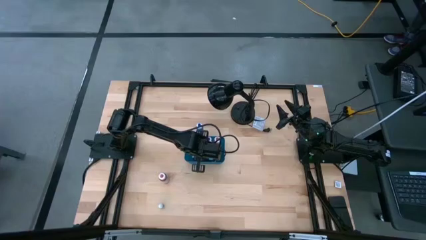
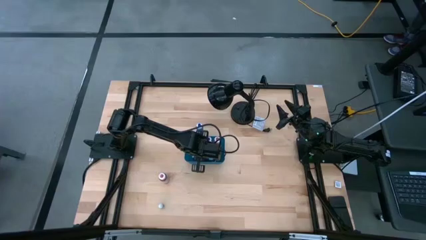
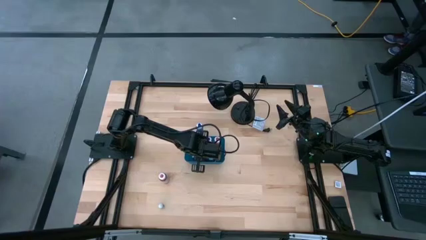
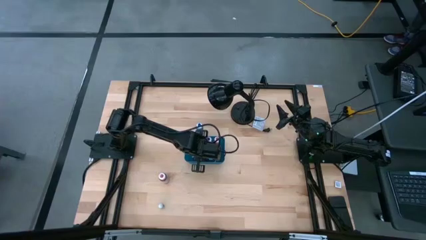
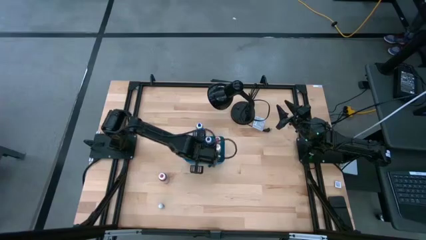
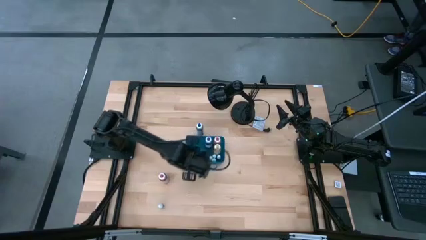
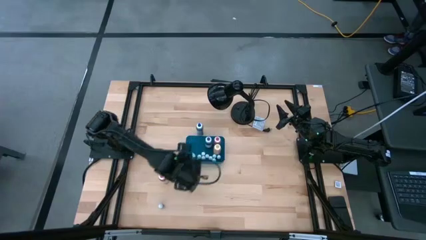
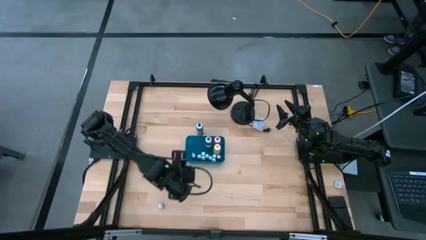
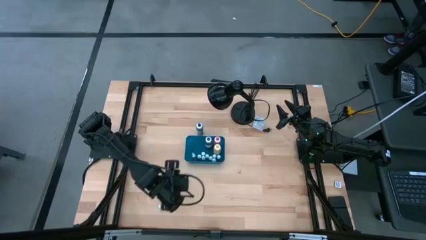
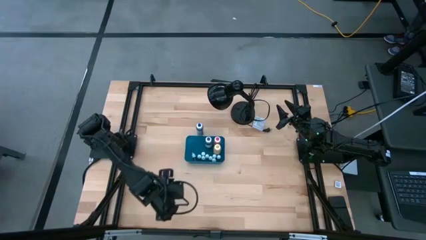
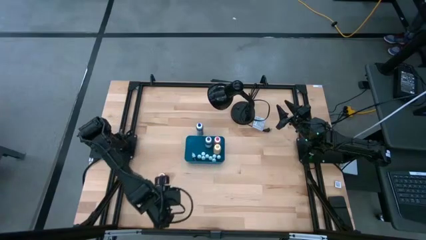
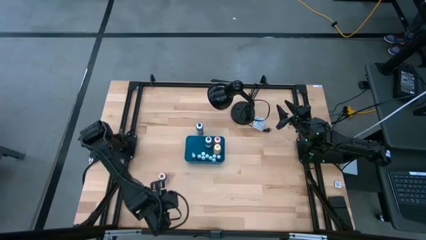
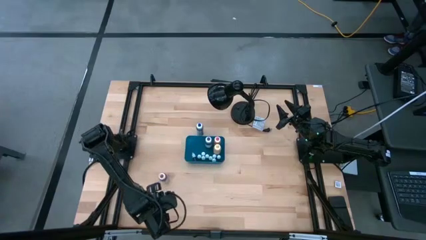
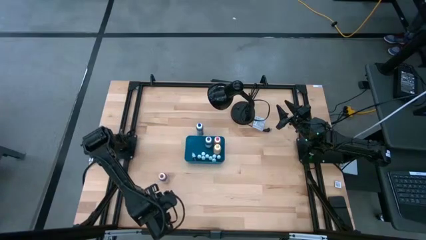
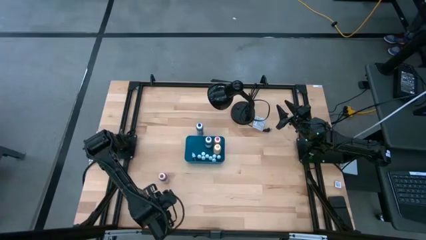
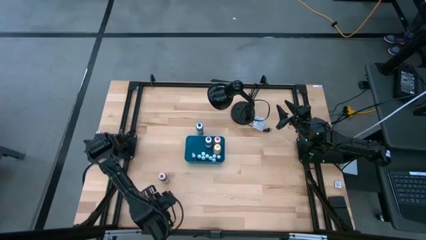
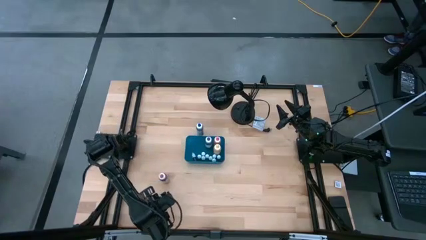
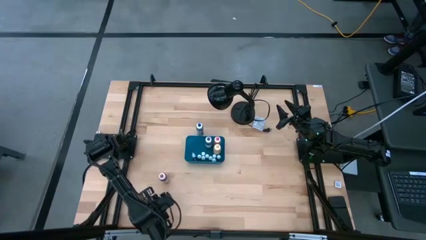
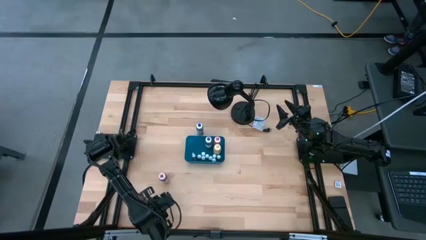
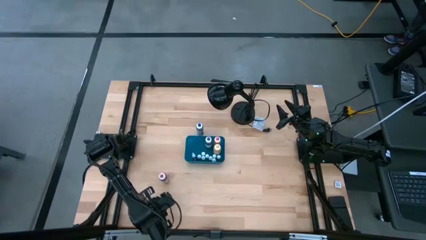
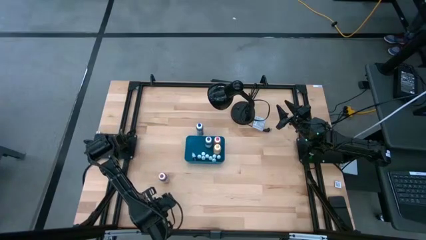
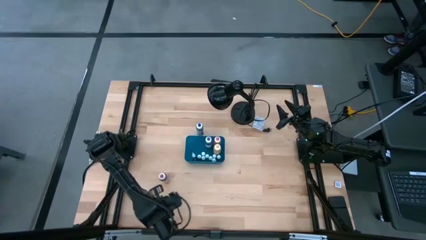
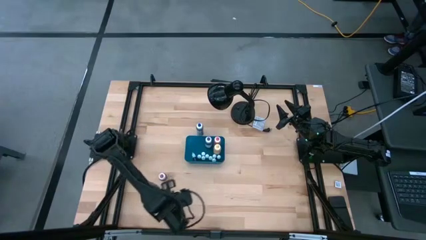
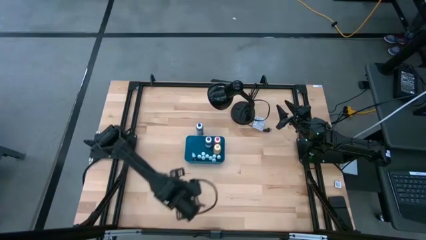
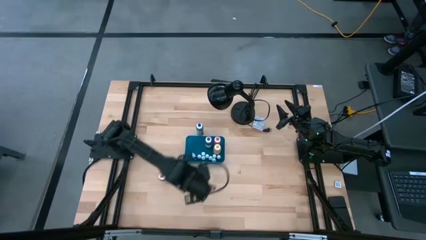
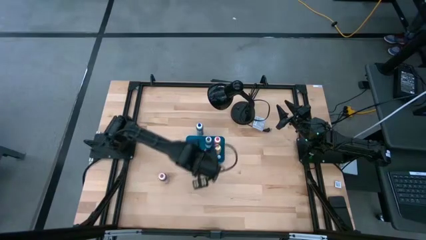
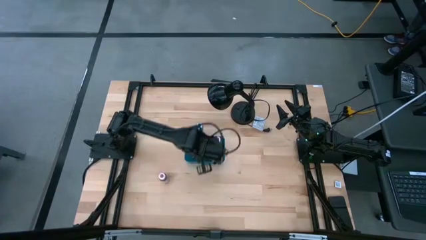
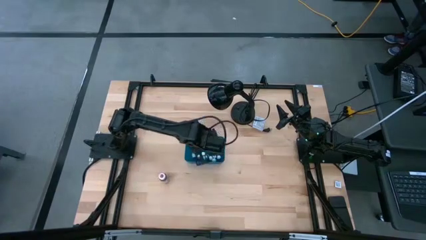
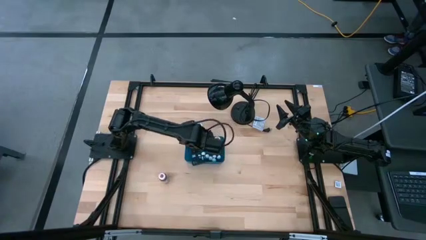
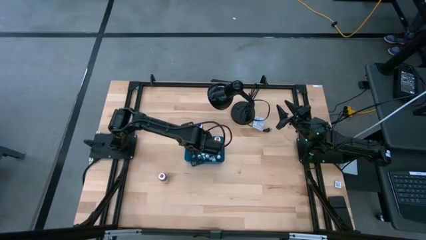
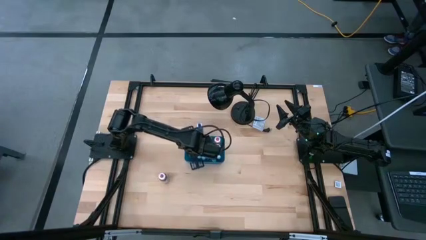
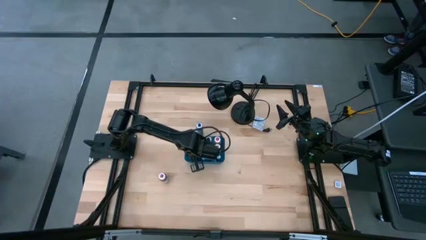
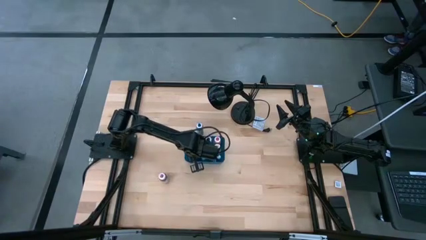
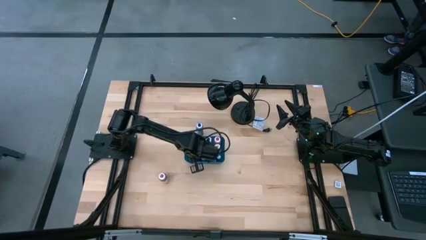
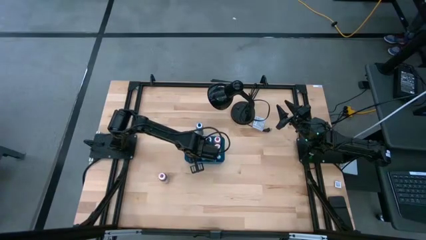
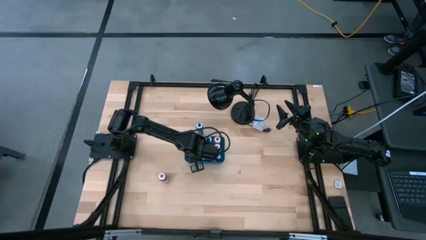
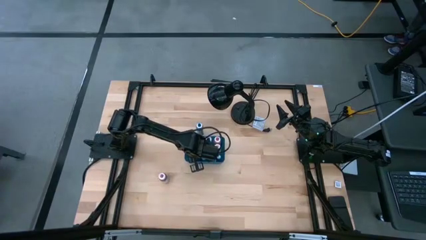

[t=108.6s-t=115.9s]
Task: Pick & Place food coloring
Put the small dark blue food coloring bottle into the blue bin

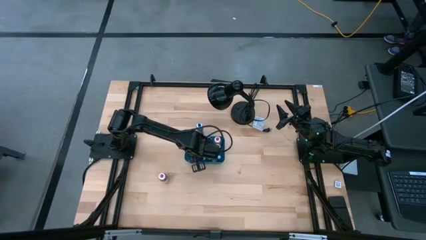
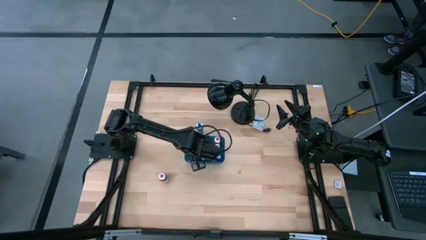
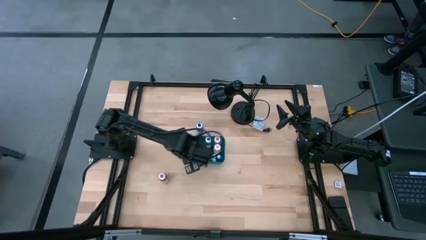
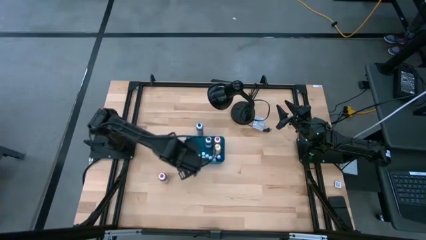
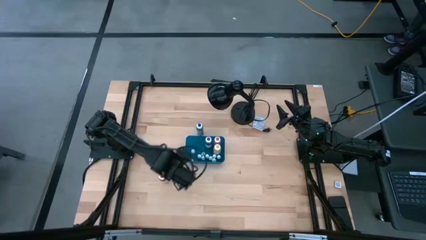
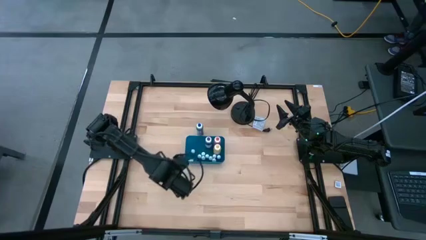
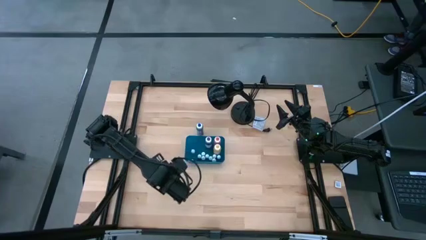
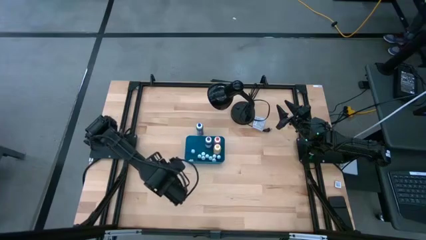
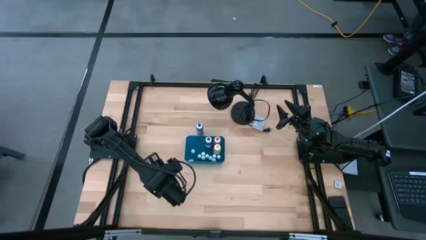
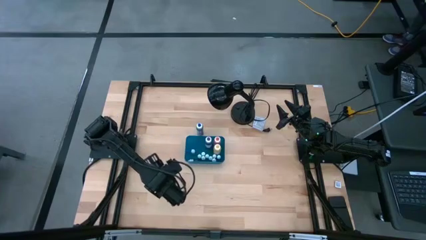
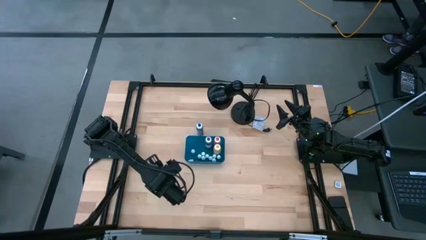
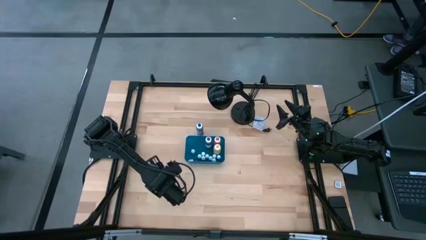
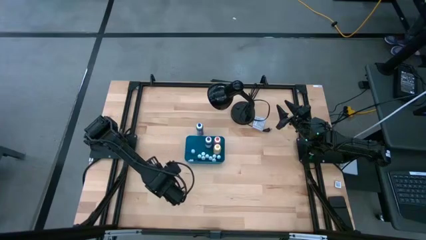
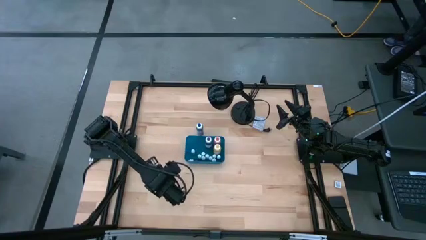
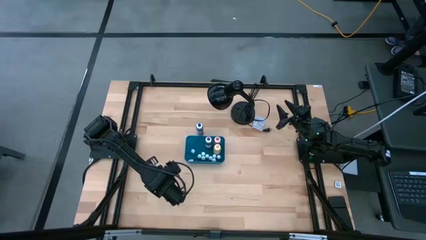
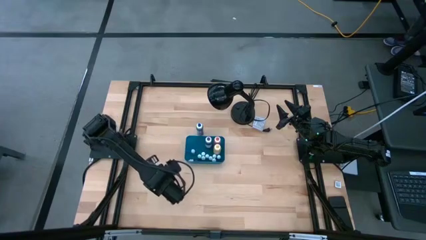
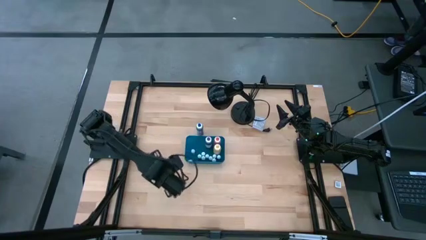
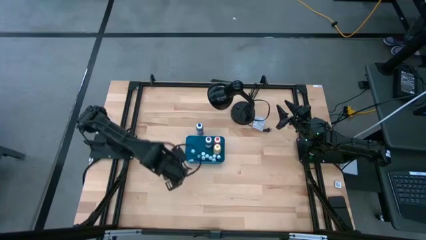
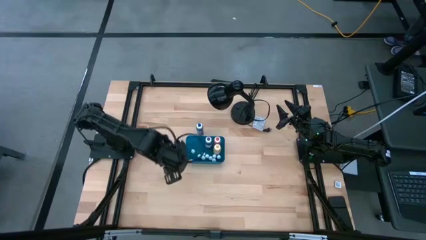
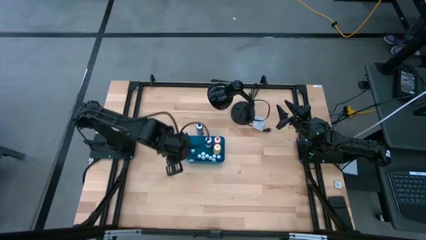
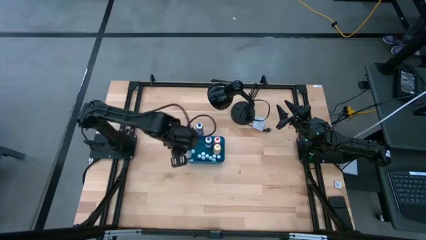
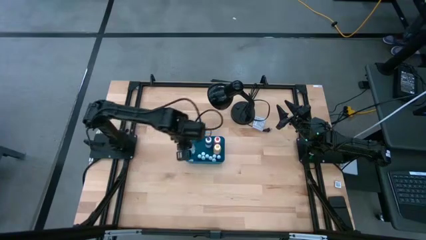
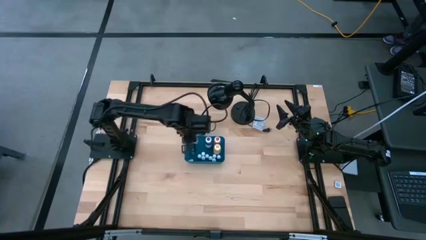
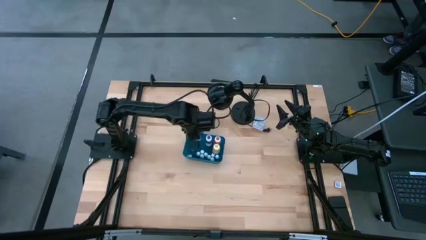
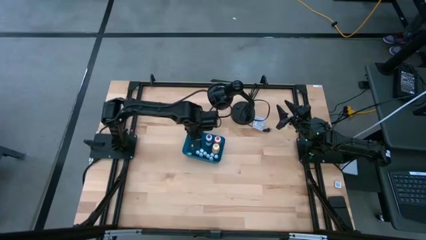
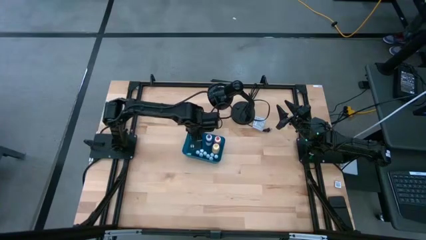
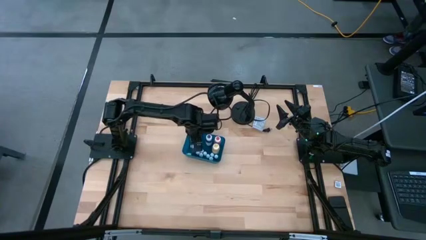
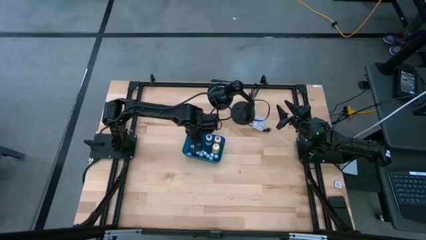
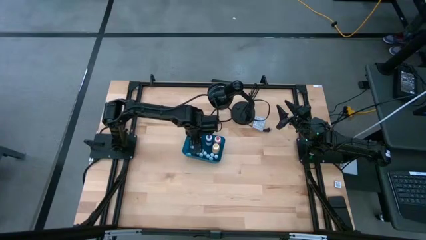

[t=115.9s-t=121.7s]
Put the large red food coloring bottle into the blue bin

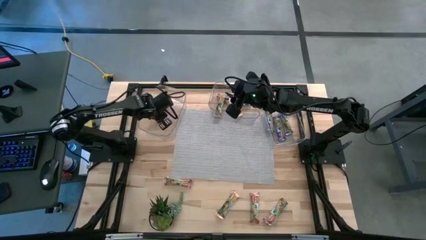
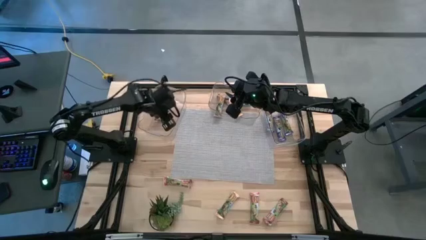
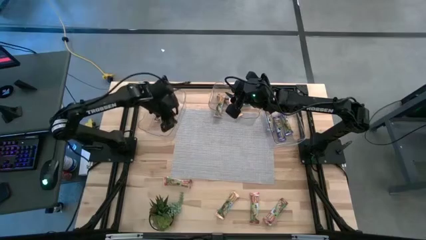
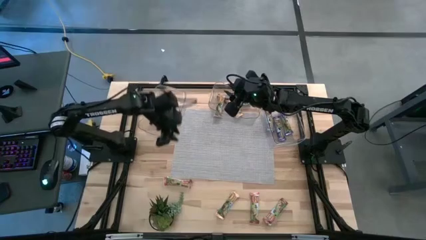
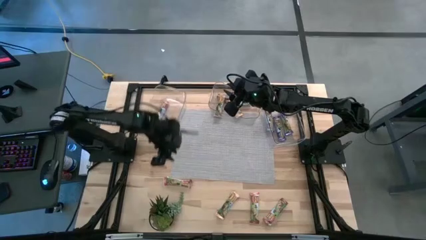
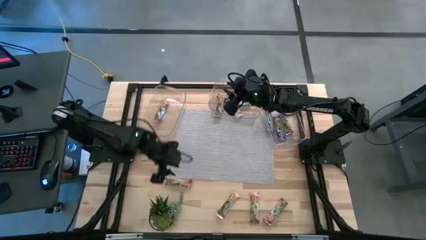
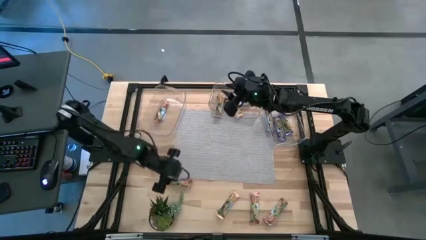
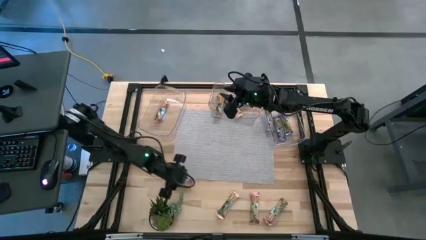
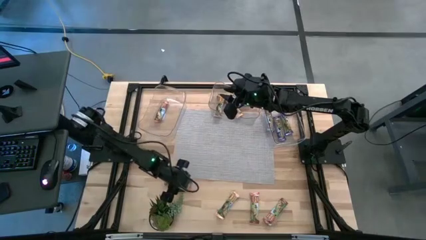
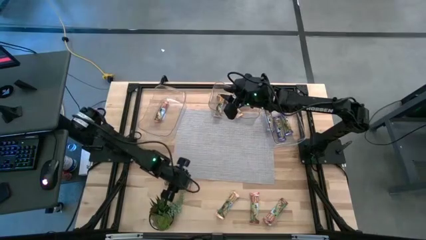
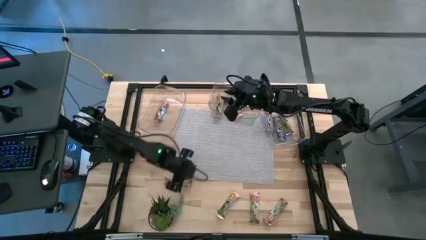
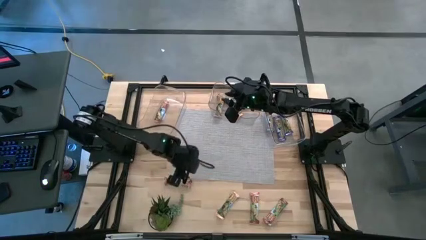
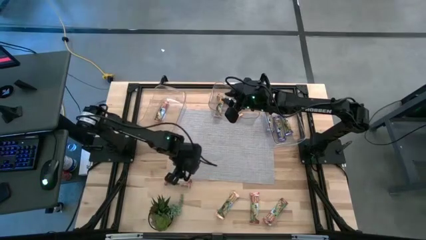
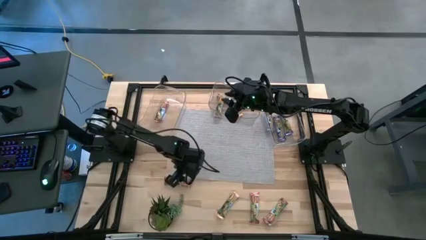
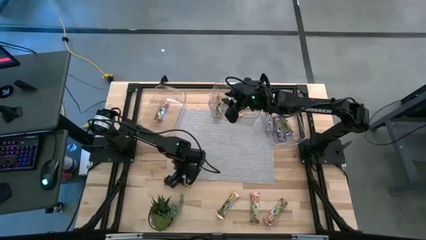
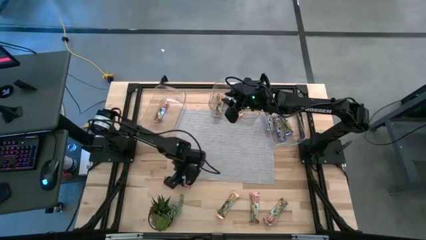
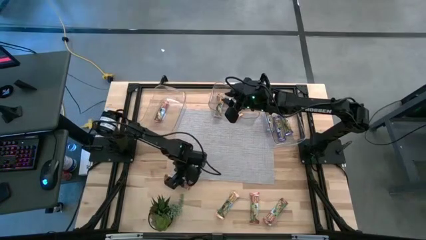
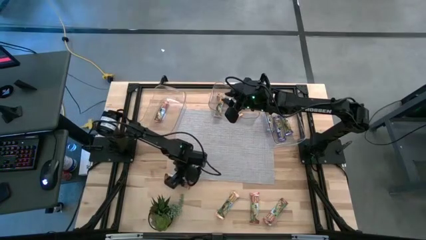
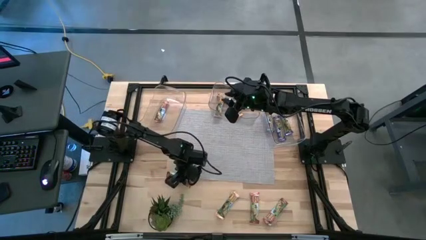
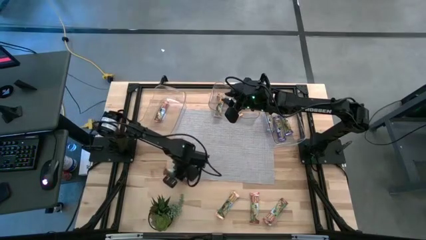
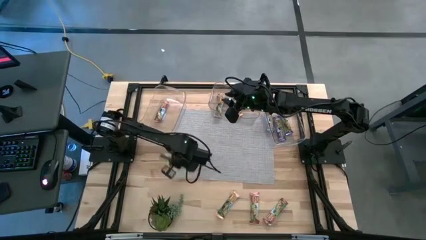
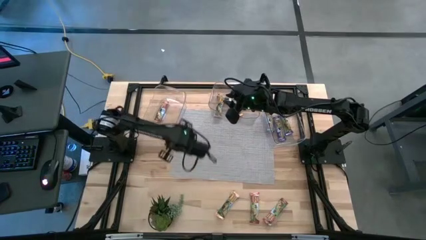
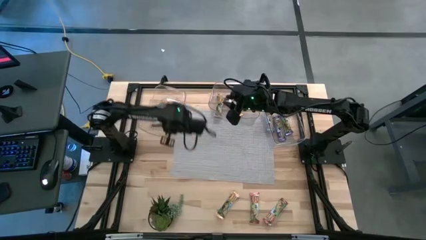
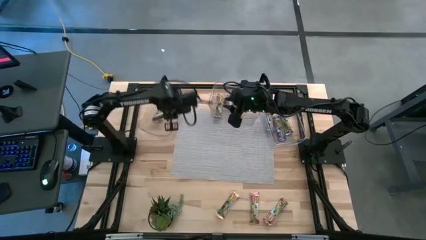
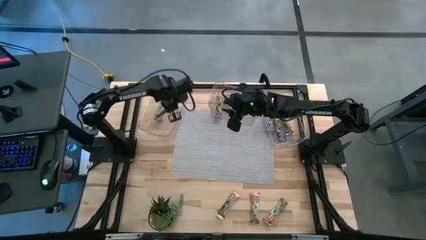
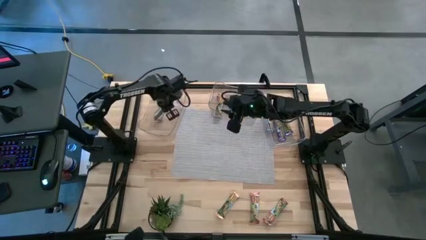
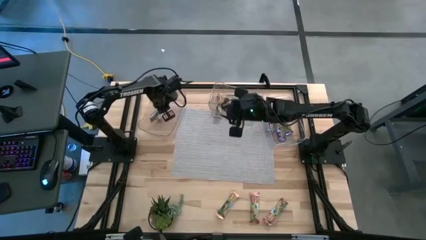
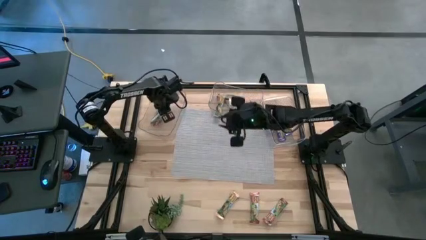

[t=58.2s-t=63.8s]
Task: Pick and place Granola Bars by type
Put the red granola bar into the left transparent bin
